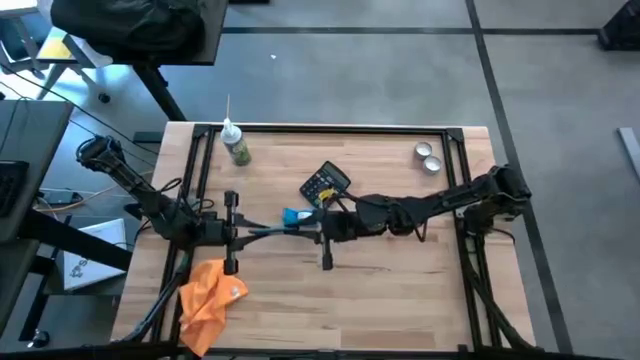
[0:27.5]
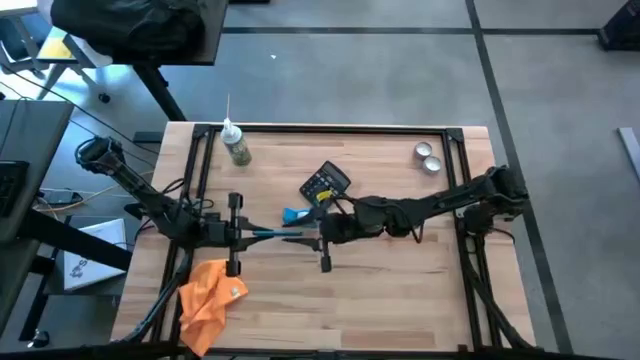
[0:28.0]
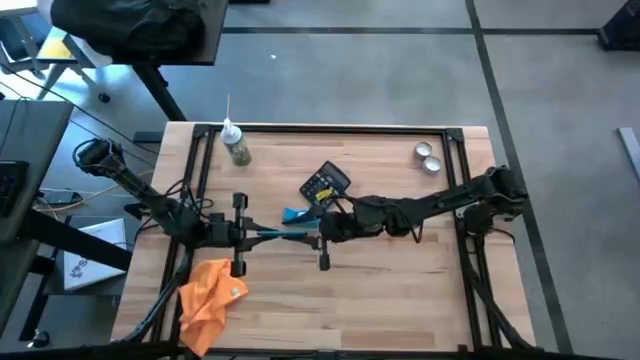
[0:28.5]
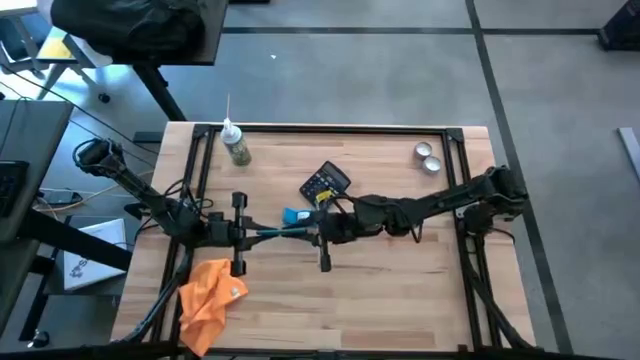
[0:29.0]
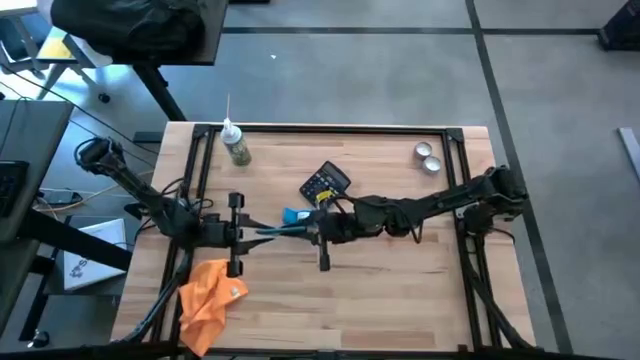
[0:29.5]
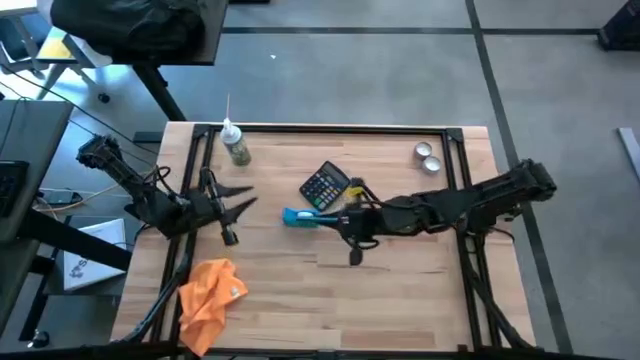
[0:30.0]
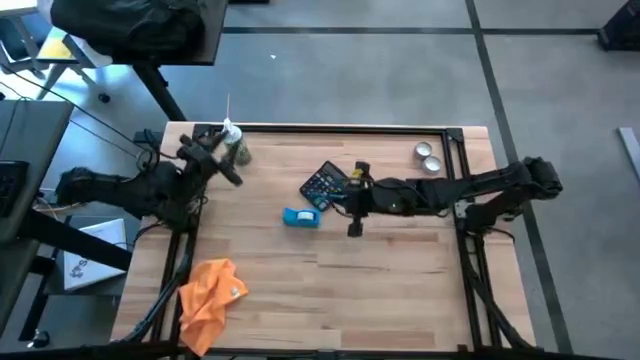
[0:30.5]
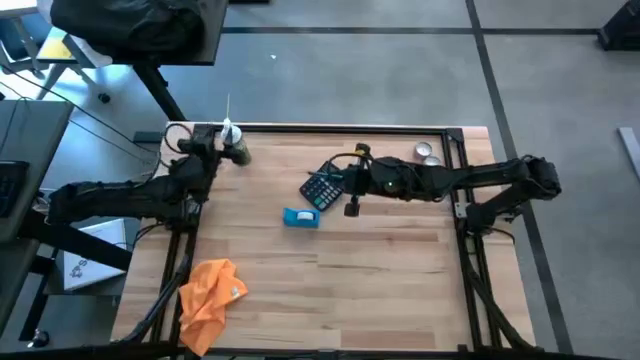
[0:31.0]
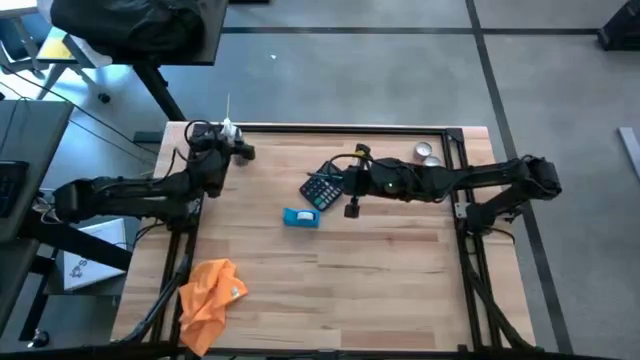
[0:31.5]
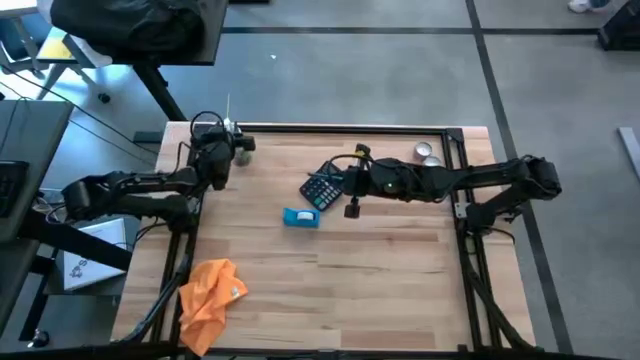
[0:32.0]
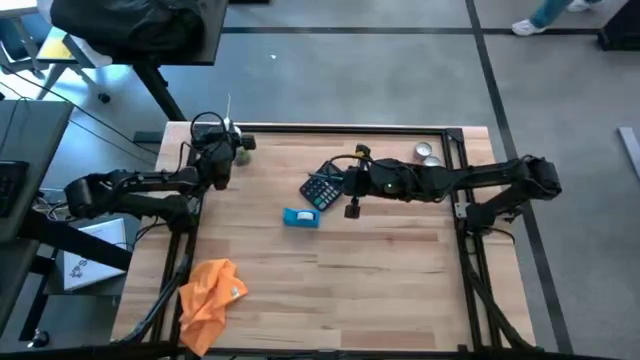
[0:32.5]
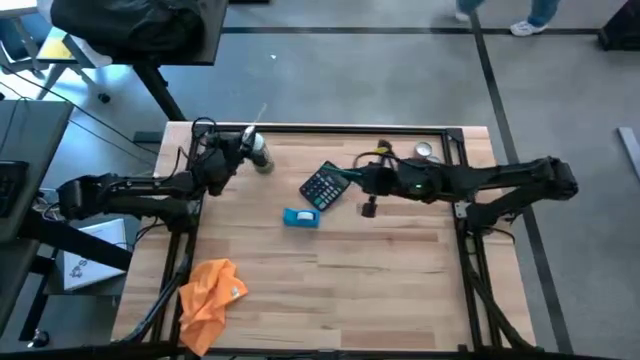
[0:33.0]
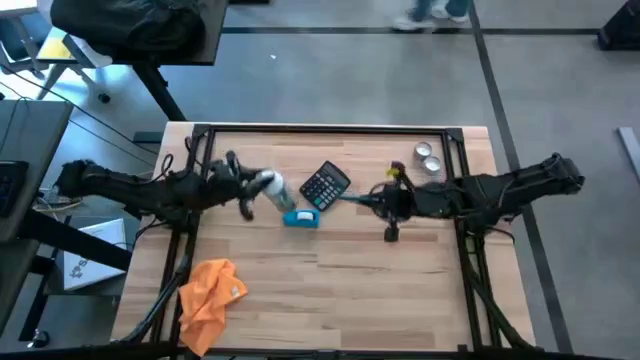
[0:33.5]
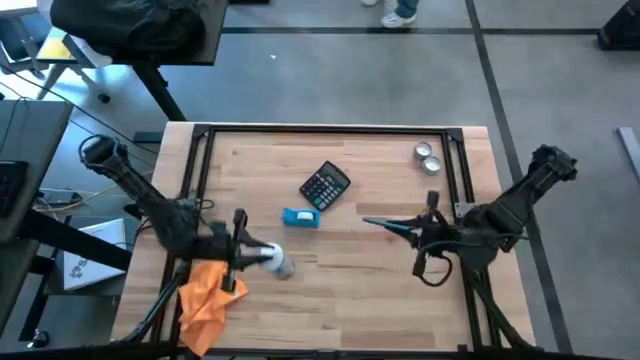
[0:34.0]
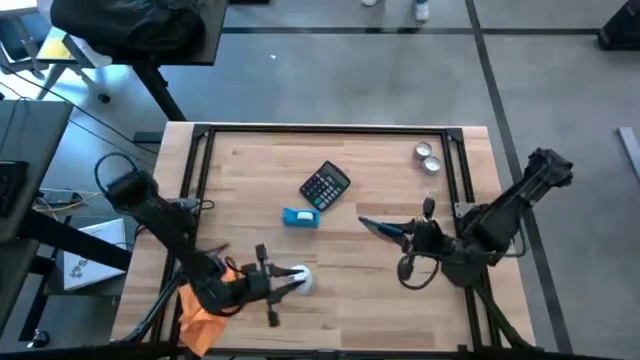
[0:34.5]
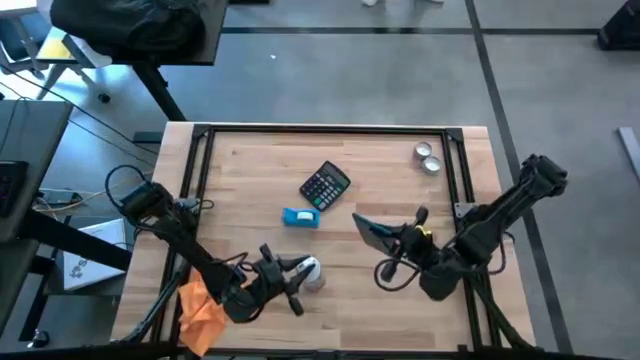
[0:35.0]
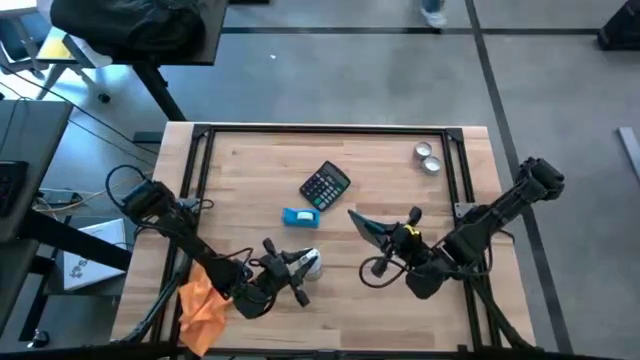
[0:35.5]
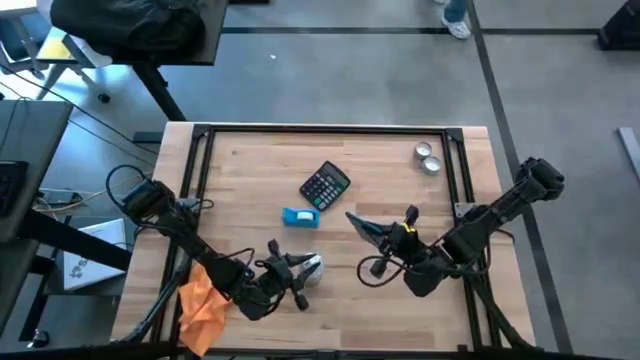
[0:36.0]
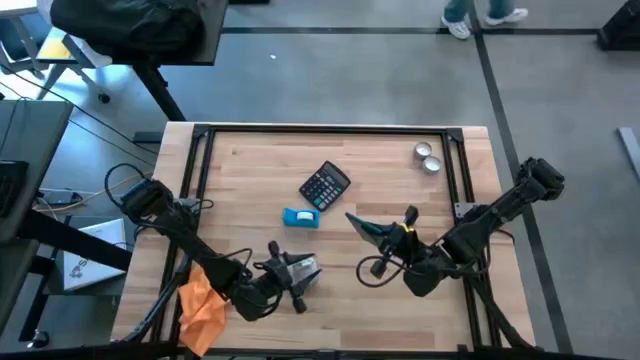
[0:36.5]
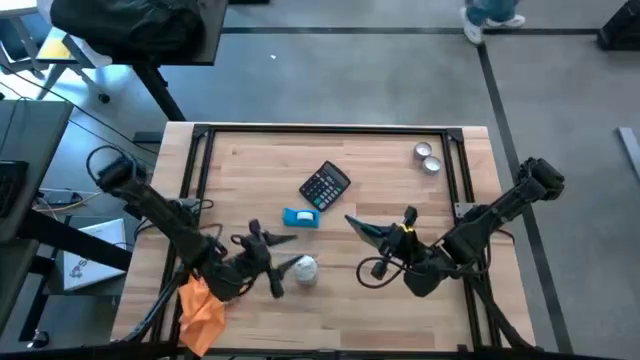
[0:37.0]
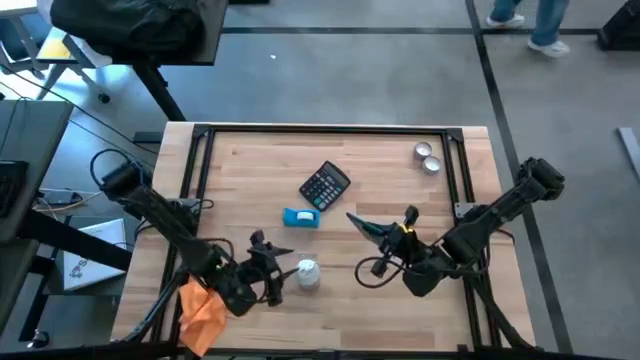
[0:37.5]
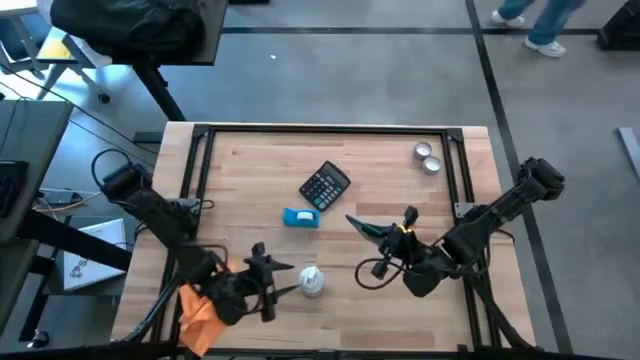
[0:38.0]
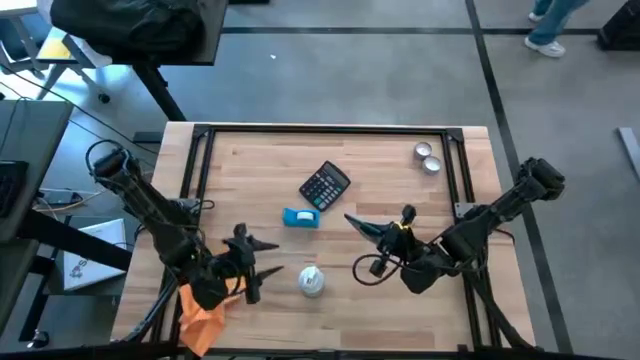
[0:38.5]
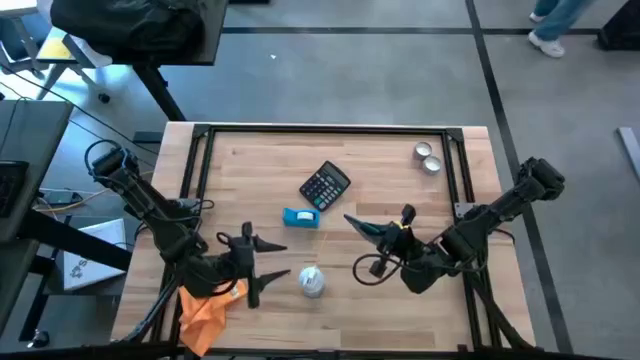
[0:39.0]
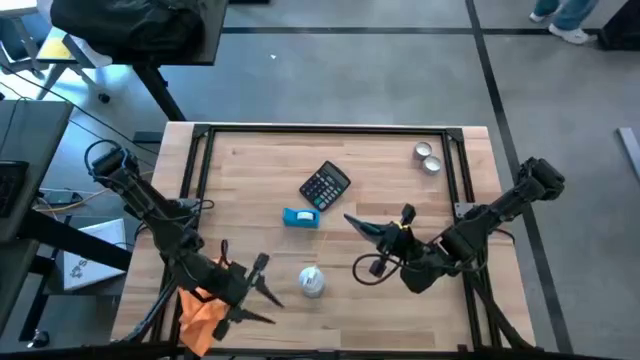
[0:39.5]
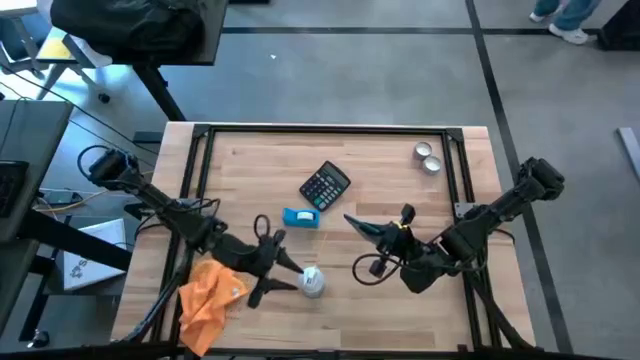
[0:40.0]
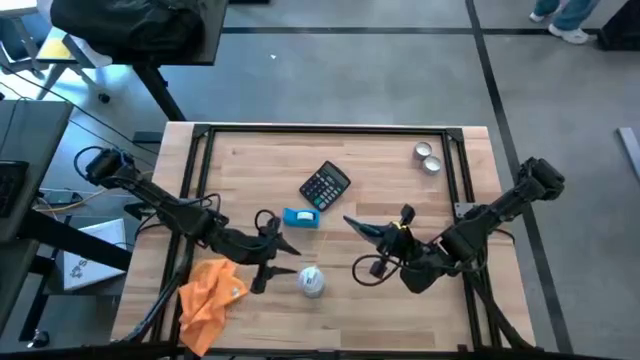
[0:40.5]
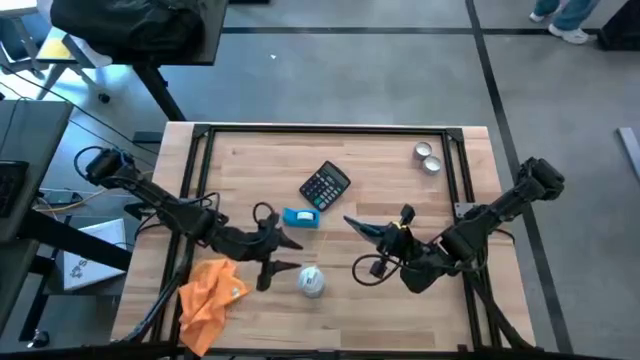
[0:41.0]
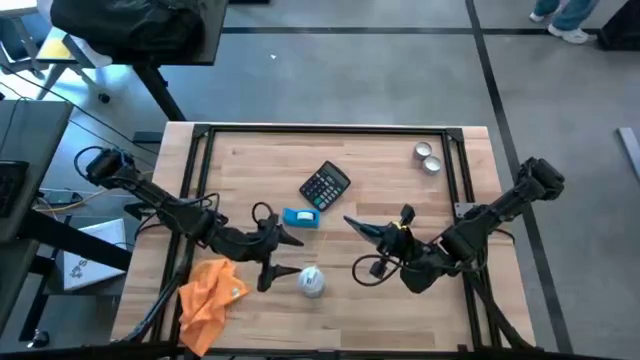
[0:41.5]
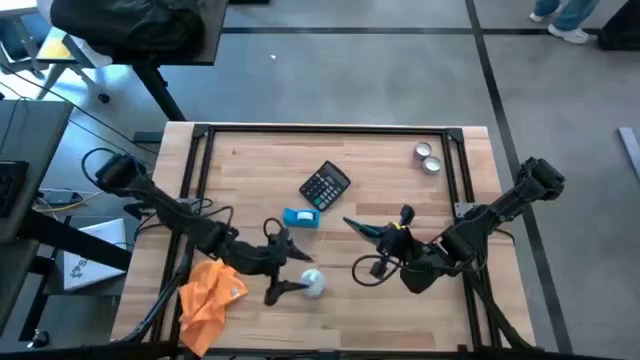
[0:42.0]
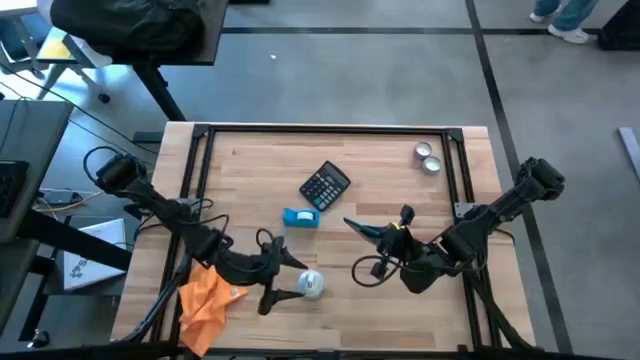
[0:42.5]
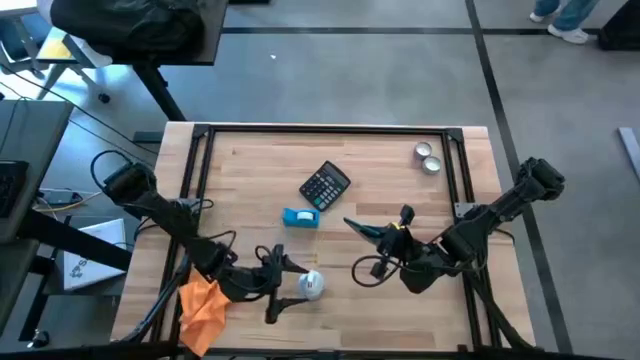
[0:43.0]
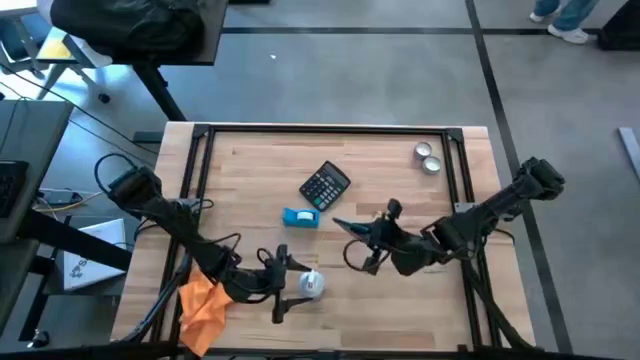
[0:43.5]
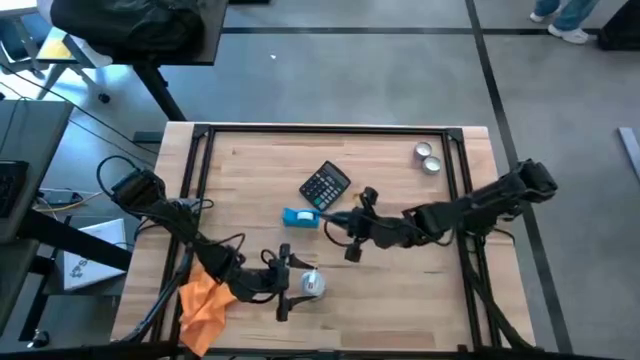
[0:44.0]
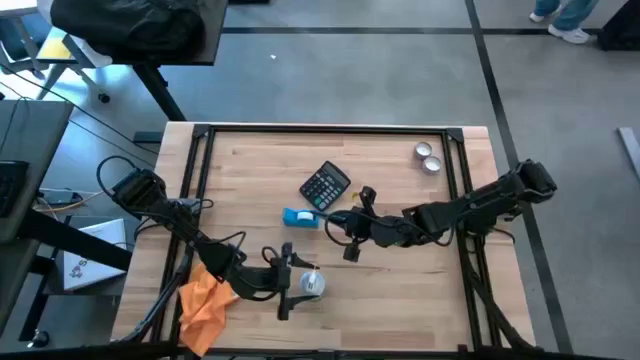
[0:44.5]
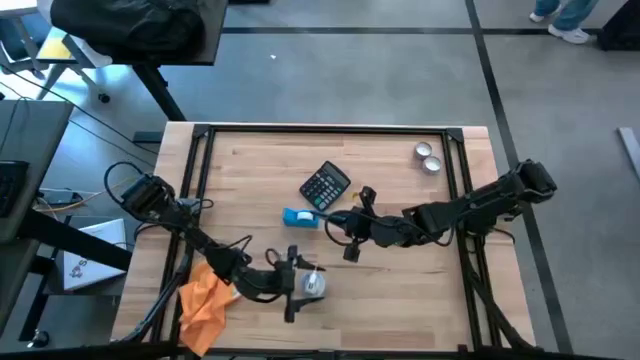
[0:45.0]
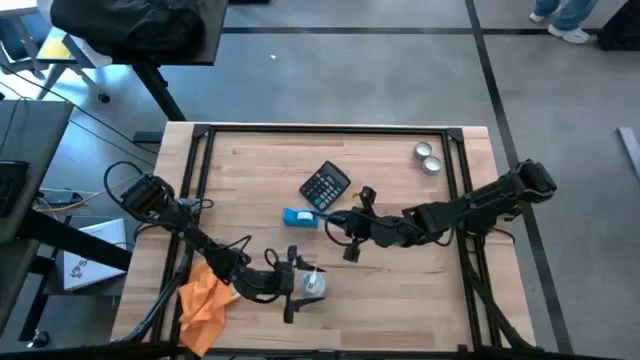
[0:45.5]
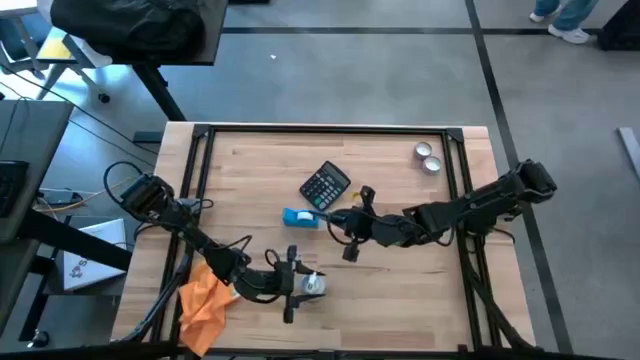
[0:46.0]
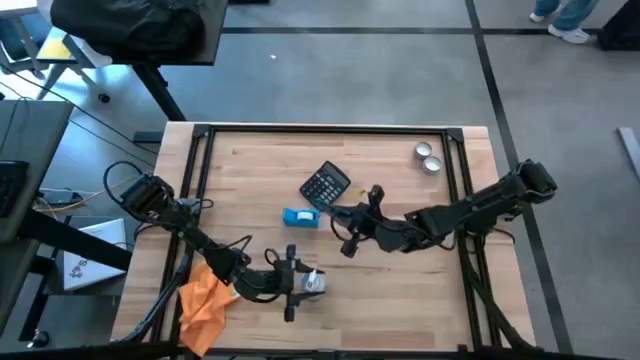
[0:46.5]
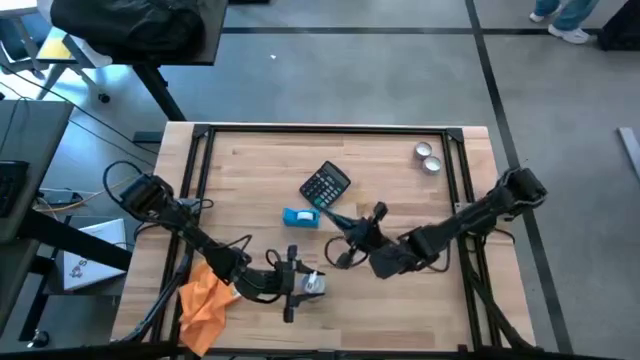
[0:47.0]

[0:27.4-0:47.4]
Task: Apply microfiber cloth
Spray the cellphone using the white spray bottle
